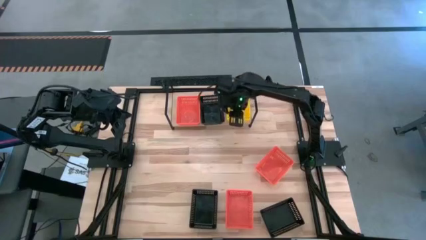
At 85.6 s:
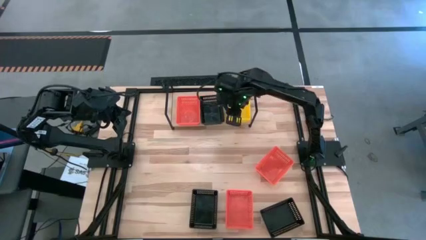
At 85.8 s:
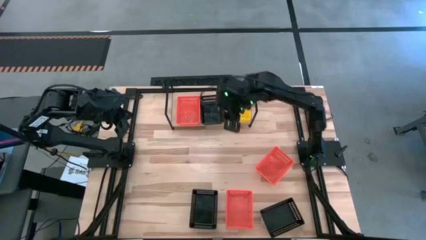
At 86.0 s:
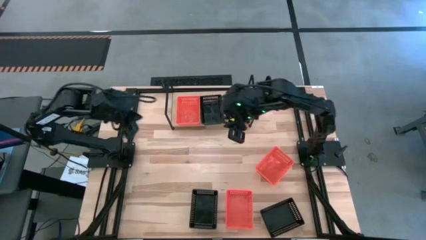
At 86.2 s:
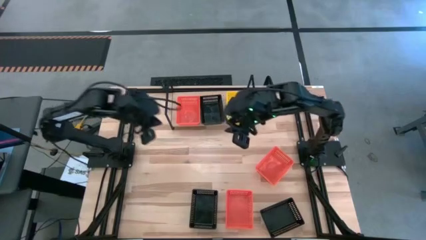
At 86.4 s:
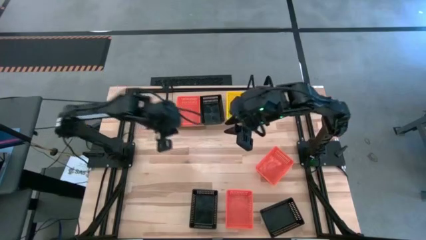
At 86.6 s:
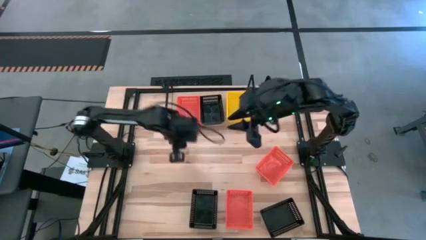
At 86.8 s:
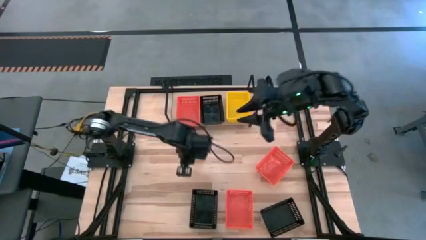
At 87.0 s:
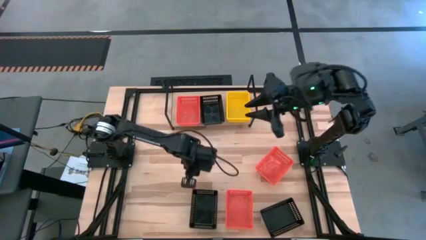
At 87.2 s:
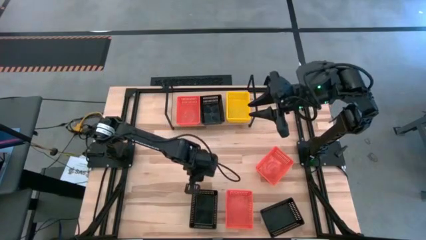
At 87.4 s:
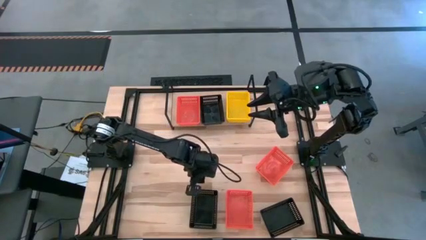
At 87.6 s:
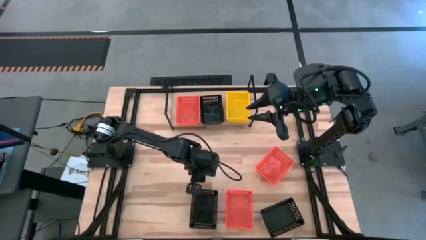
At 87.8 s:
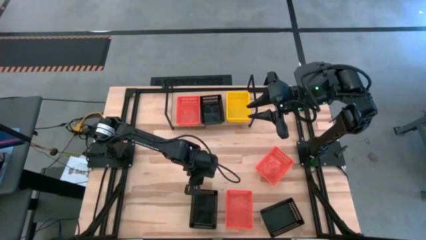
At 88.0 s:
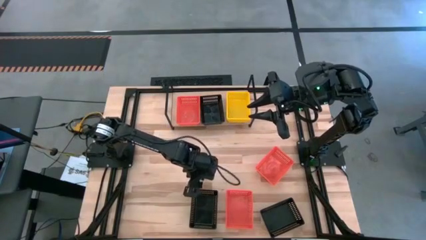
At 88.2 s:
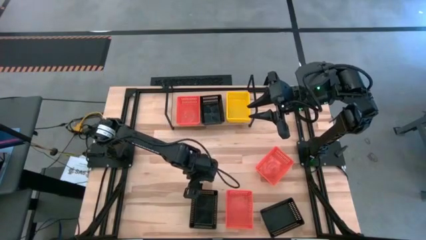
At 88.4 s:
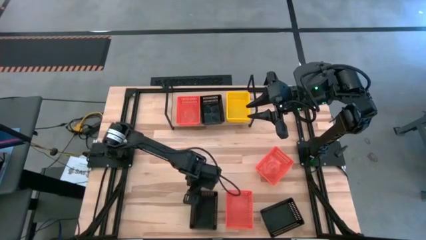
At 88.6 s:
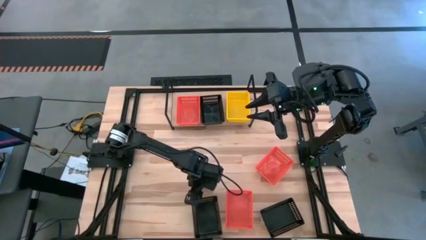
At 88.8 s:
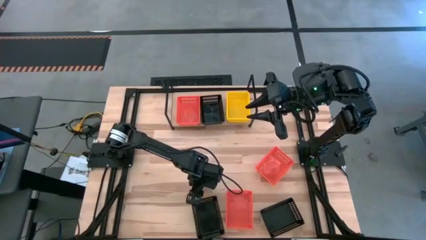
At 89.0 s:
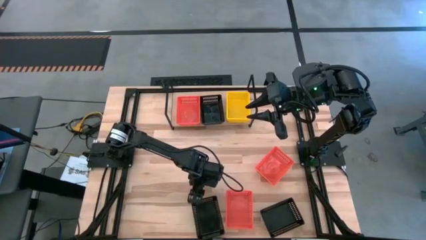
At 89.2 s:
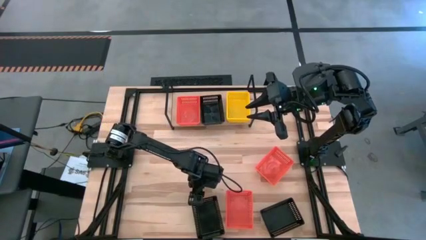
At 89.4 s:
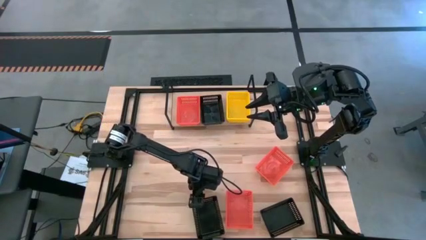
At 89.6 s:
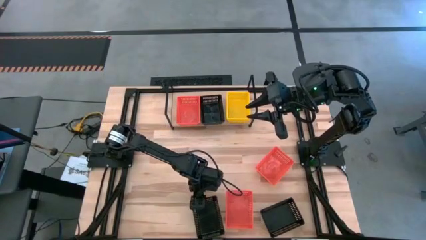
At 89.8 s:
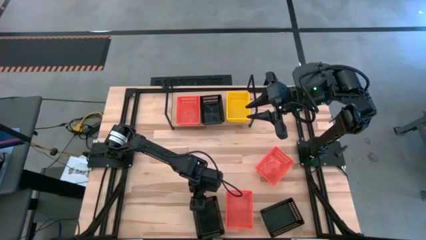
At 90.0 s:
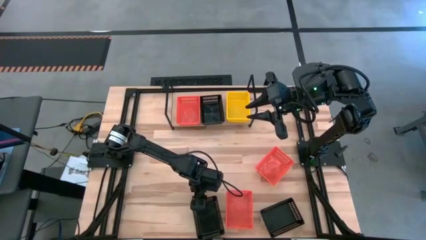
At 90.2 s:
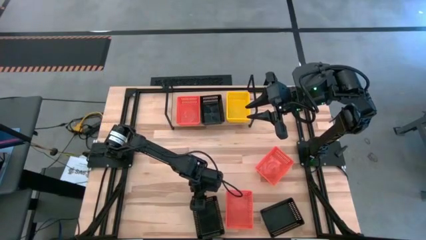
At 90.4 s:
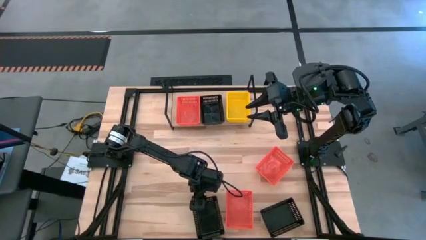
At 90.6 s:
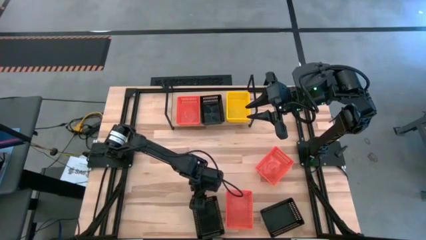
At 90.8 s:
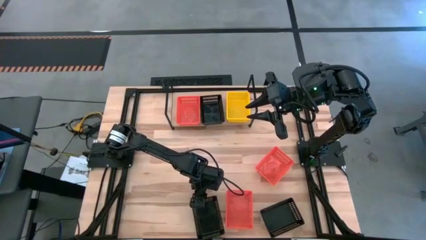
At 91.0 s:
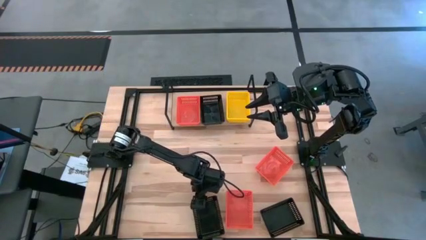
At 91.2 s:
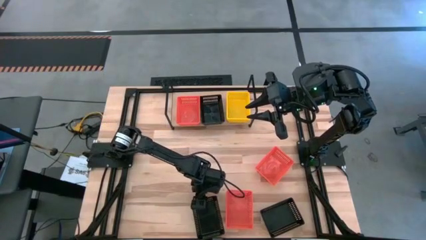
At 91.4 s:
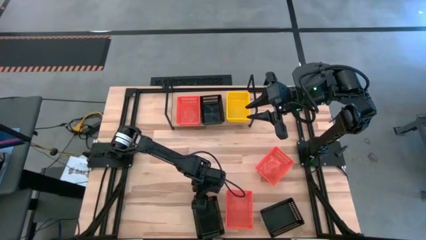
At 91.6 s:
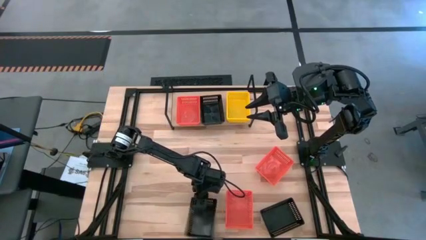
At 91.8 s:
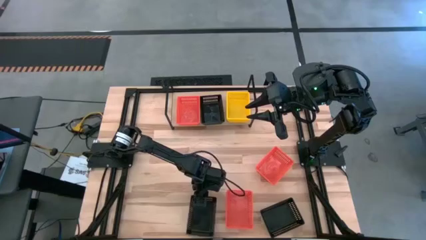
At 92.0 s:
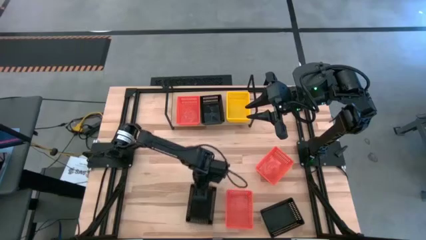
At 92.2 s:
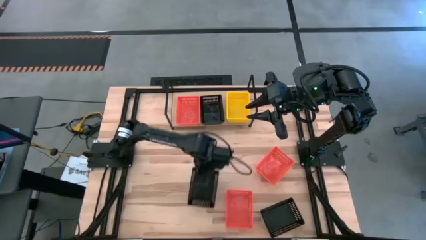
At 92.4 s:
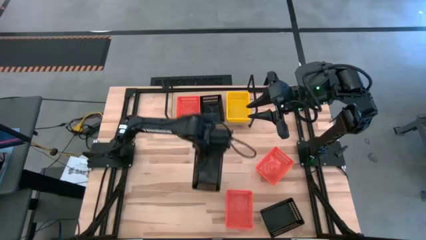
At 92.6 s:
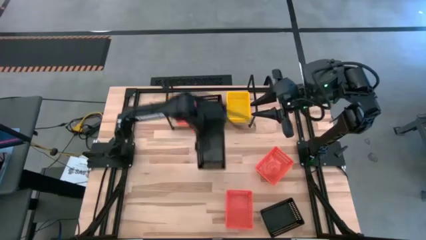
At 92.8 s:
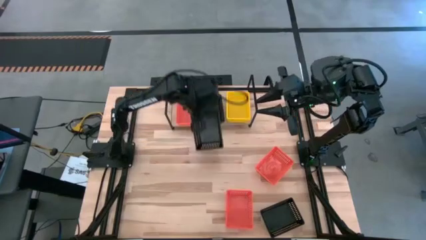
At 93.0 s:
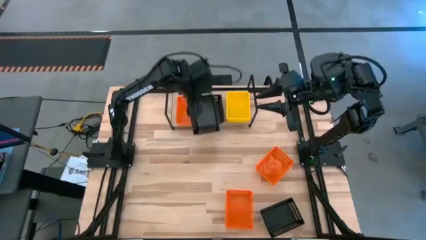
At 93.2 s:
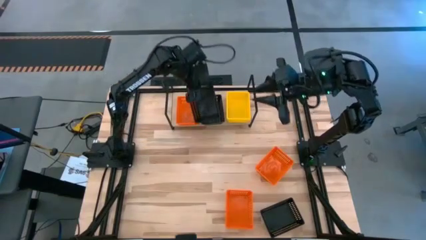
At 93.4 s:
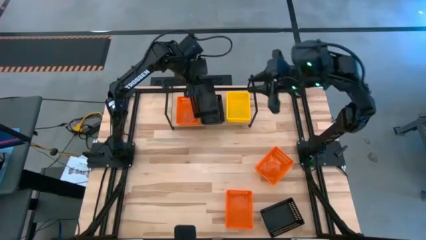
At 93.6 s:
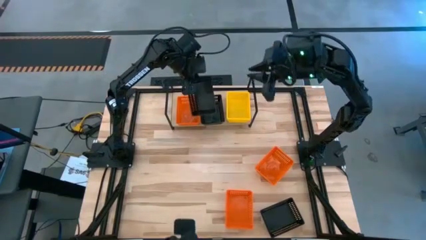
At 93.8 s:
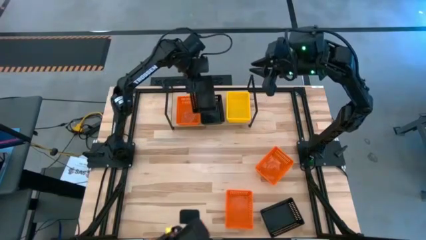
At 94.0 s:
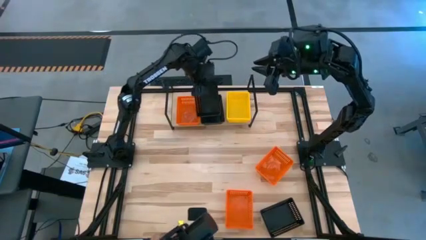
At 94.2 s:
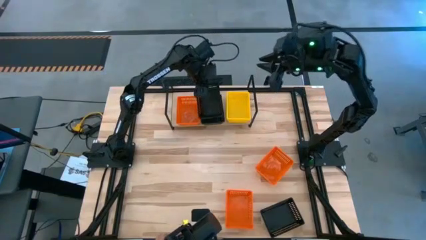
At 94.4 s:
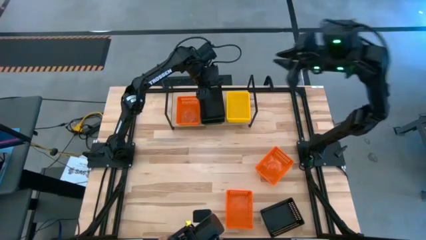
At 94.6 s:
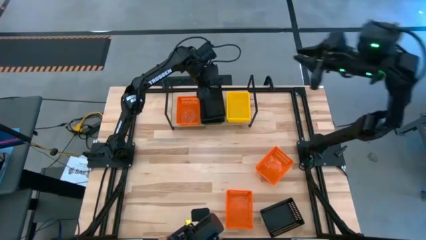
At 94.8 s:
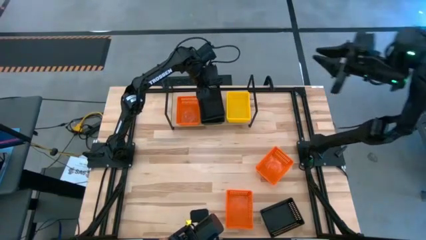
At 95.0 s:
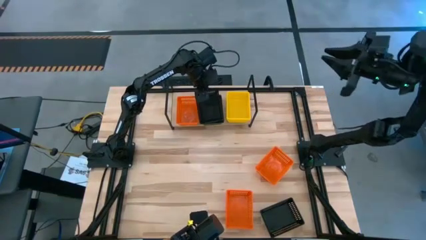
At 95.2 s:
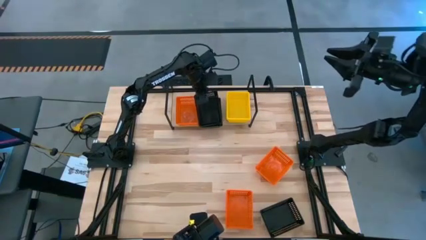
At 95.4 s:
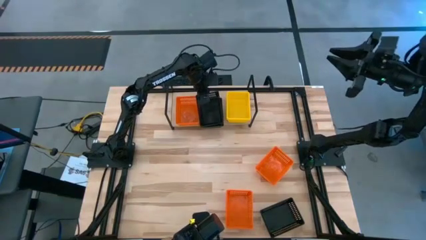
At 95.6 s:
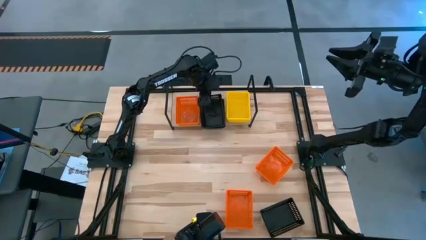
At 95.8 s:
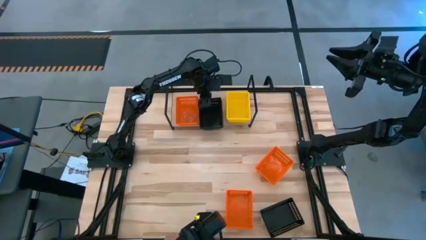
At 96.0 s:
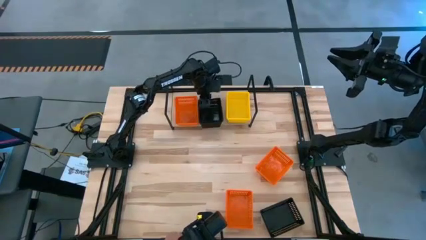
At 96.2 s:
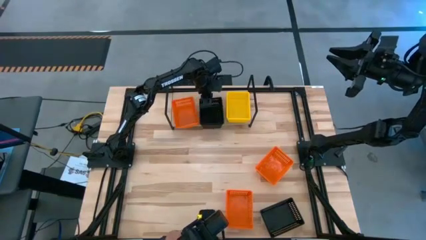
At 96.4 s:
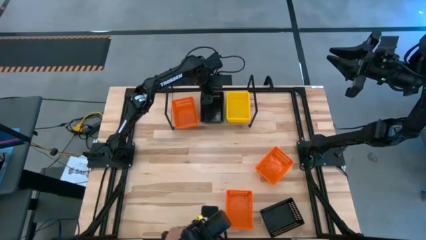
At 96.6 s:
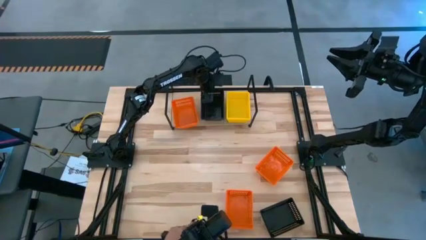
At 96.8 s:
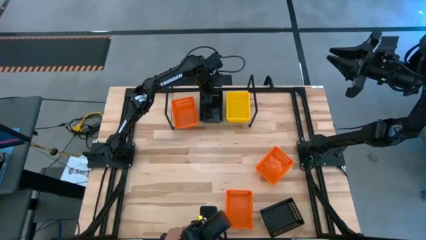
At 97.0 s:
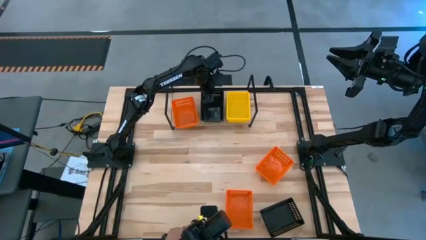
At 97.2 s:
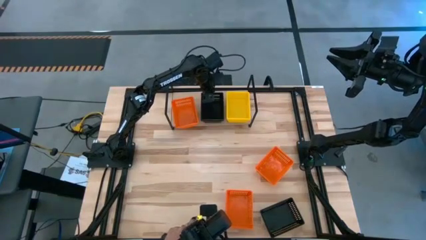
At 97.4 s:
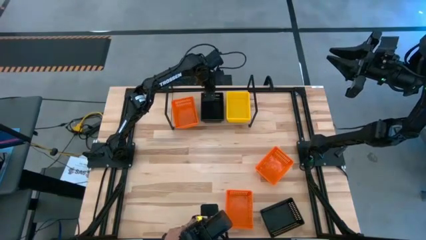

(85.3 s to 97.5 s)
Task: Stack baskets on shelf by color
Stack the left black basket on the black basket on the shelf
